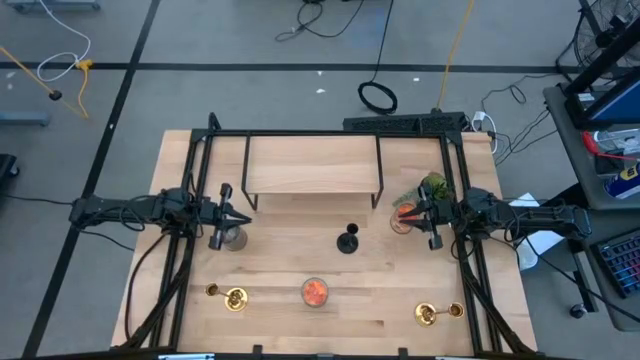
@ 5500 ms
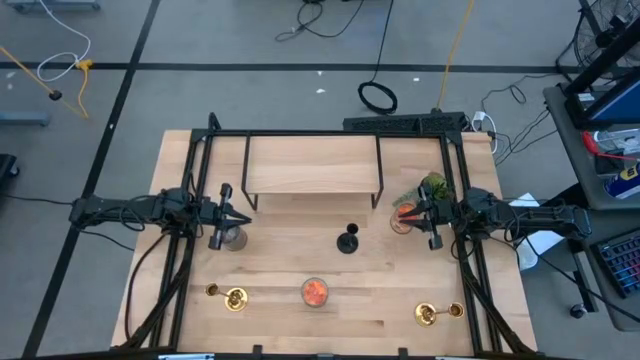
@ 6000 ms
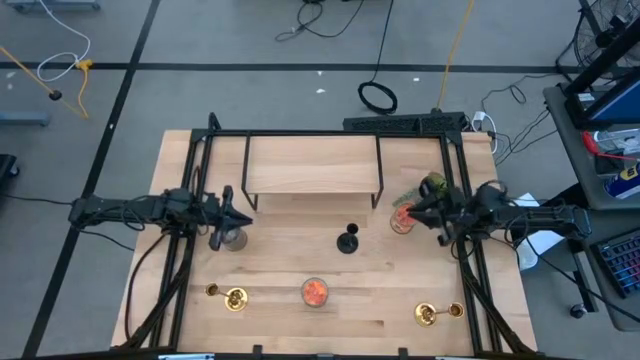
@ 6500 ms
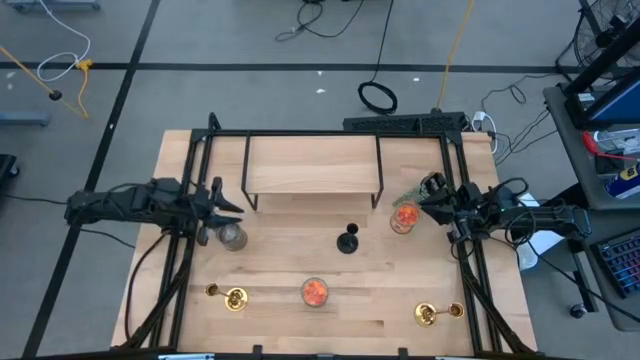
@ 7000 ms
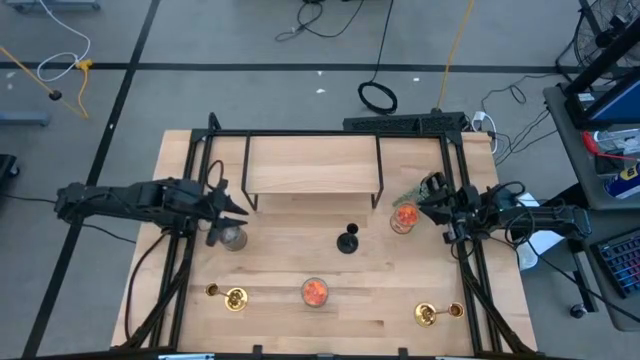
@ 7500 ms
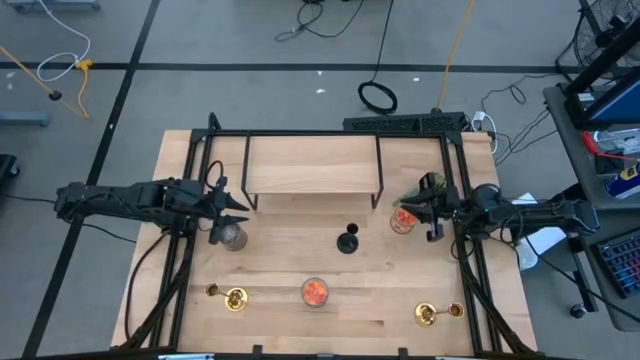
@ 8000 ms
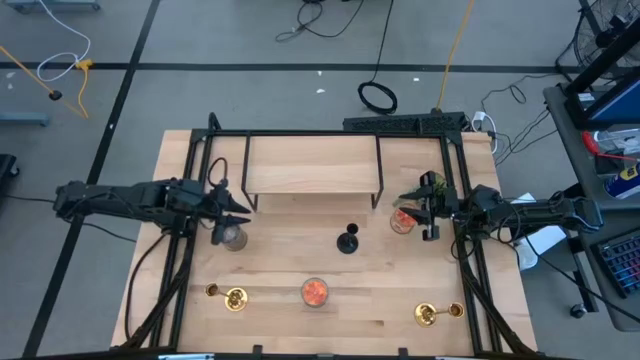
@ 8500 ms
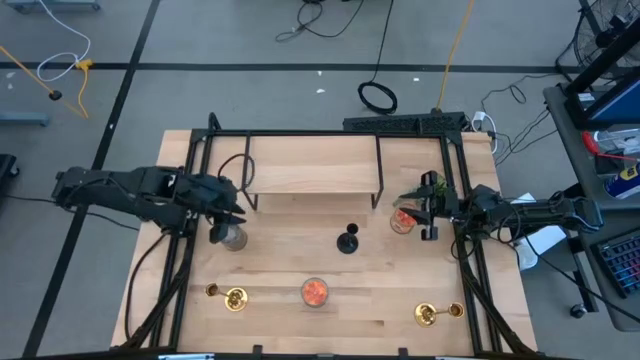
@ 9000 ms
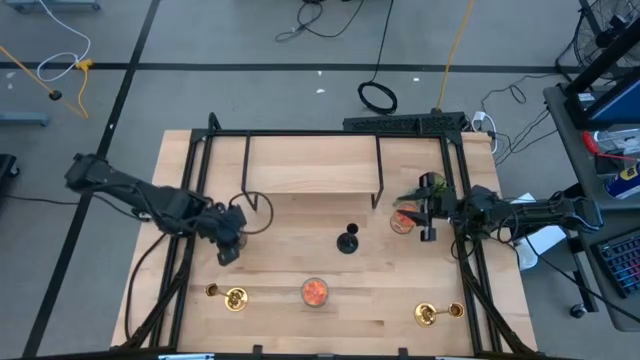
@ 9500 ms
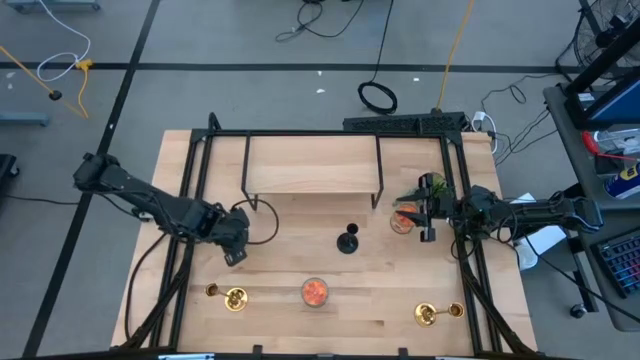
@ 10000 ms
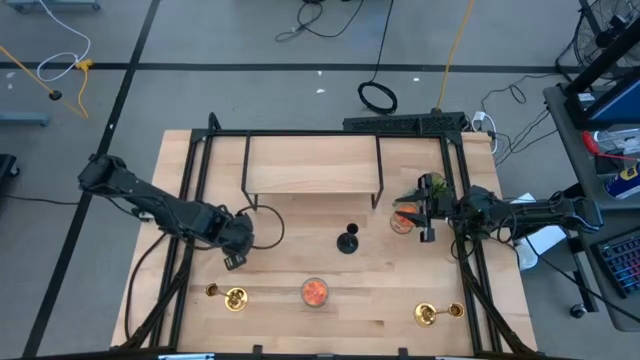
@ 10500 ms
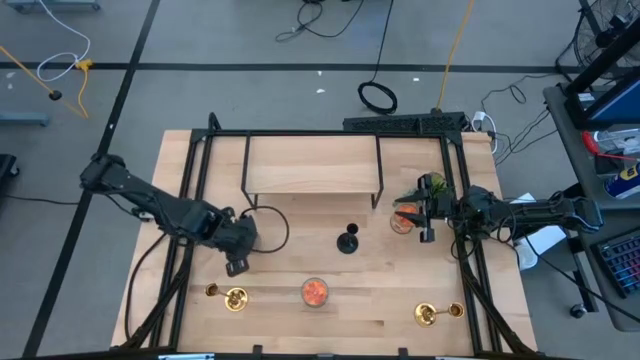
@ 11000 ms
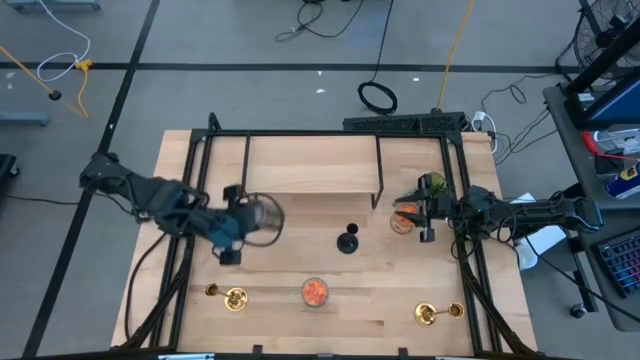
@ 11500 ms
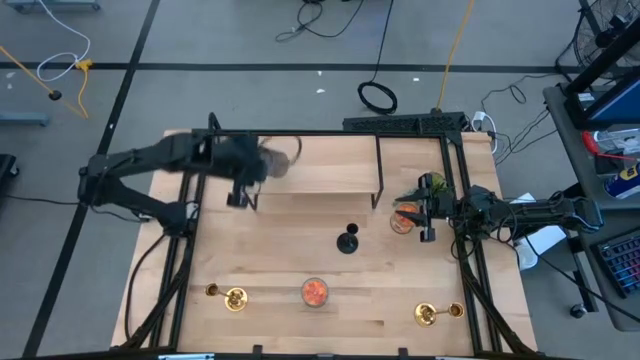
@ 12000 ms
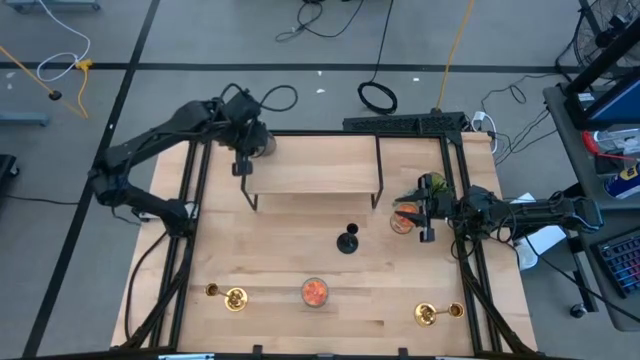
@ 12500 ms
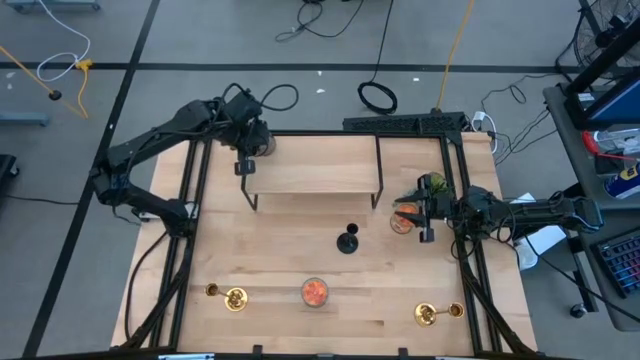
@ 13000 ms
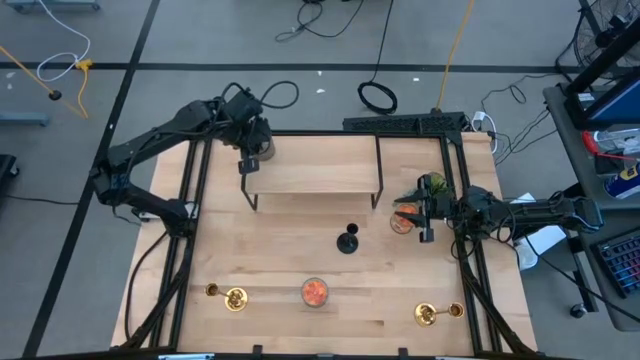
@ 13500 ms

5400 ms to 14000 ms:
Task: Pick & Place candle stick holders
Put the brown scented candle on the shelf

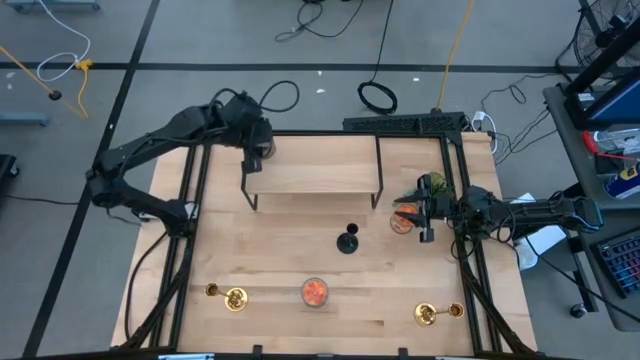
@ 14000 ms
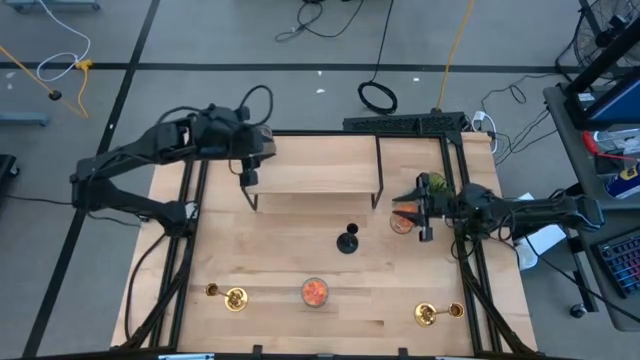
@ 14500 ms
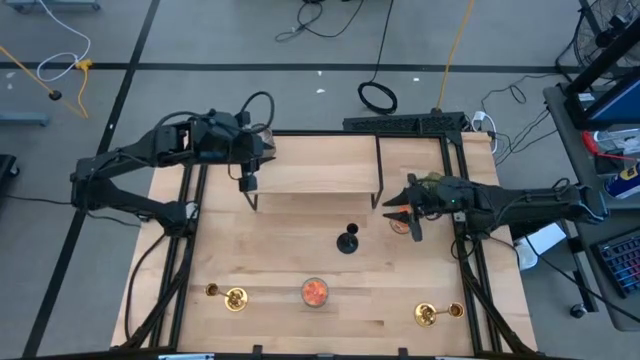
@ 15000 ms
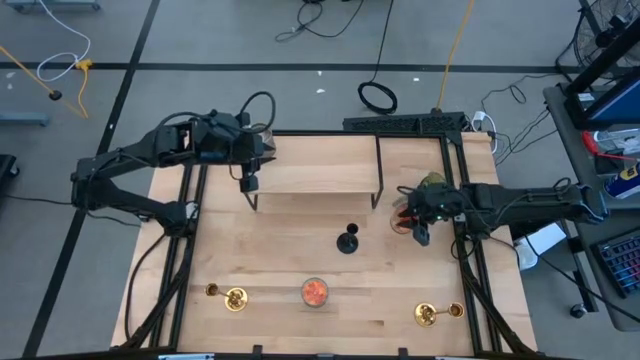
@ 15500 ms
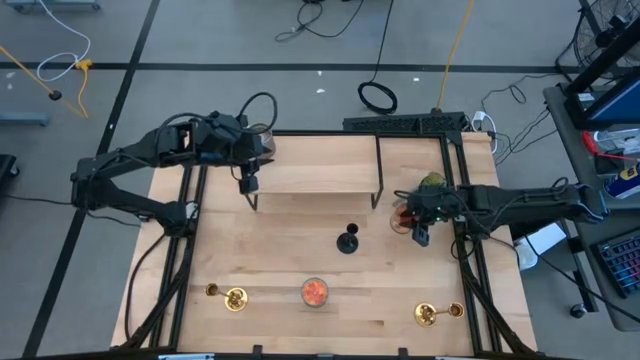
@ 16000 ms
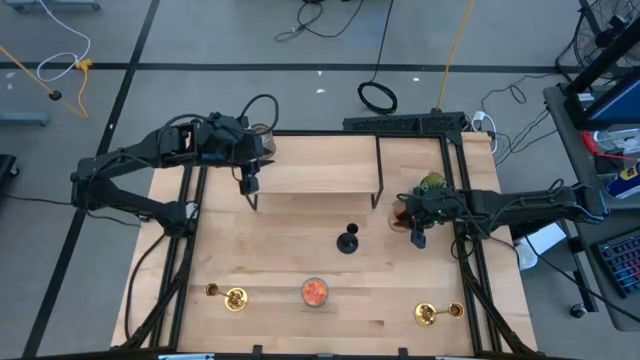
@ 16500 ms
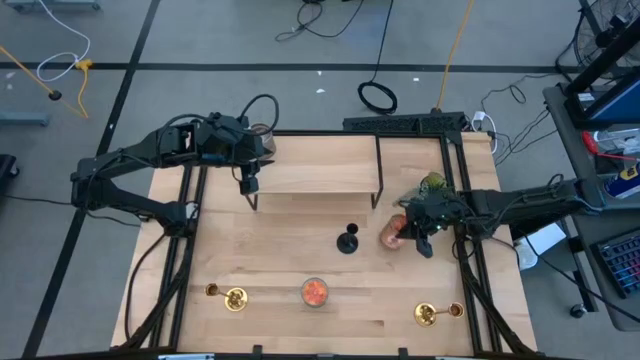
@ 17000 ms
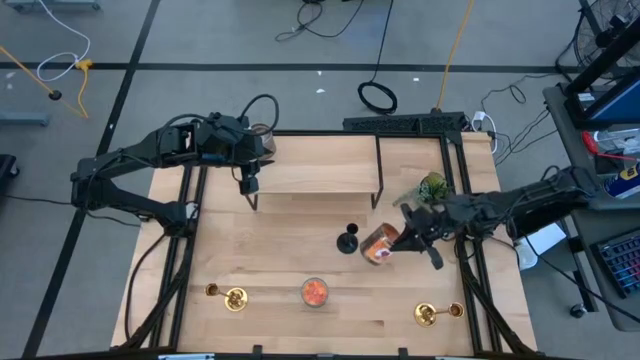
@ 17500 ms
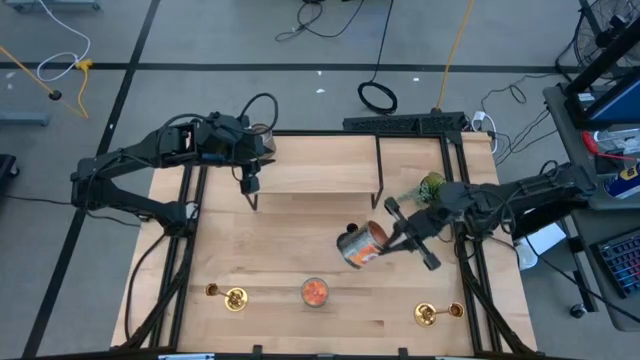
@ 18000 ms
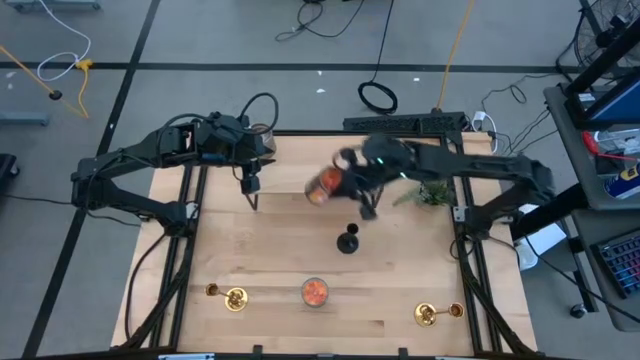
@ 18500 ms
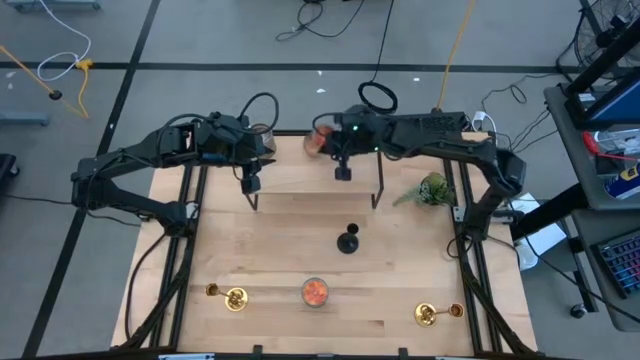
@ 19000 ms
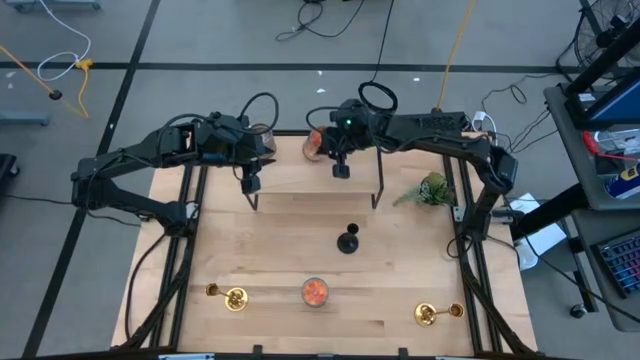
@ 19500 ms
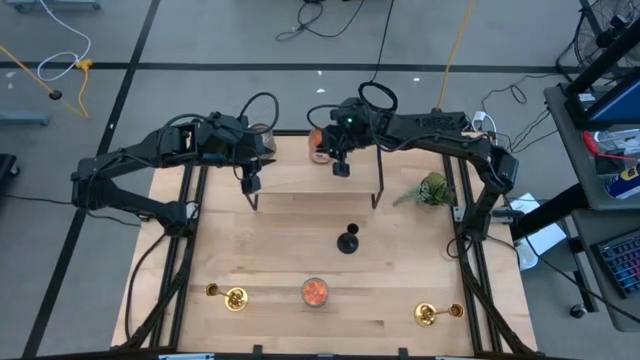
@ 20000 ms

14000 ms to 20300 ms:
Put the top orange scented candle on the shelf

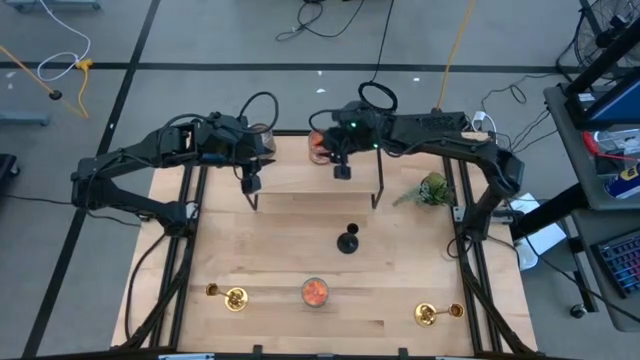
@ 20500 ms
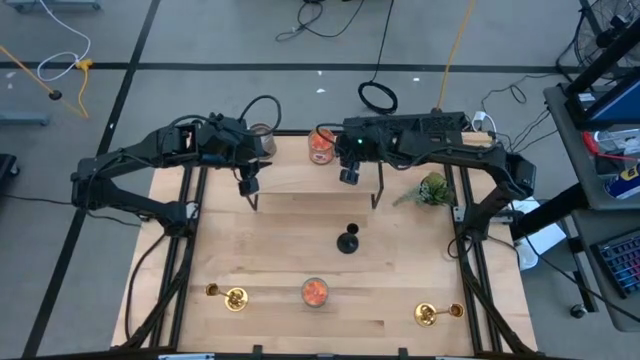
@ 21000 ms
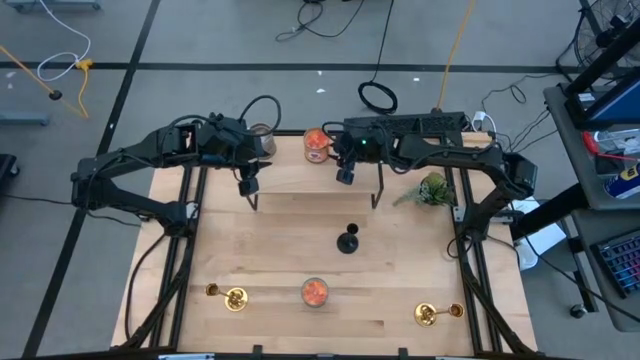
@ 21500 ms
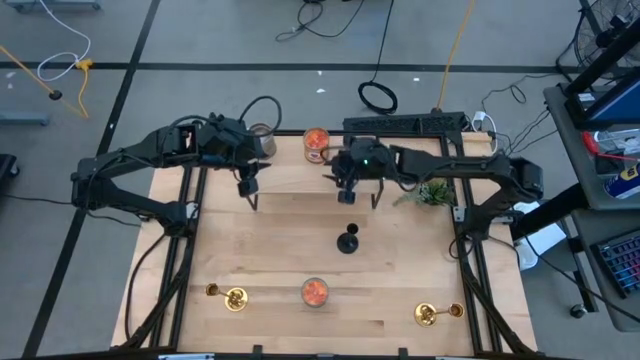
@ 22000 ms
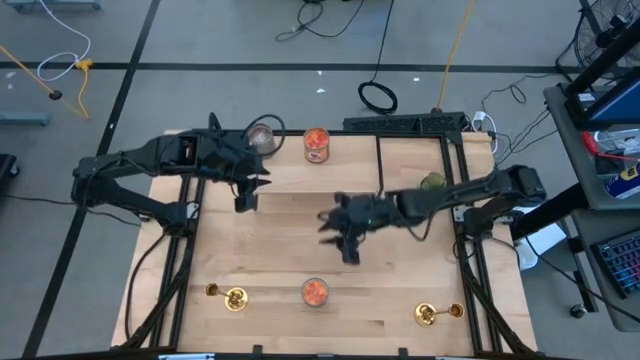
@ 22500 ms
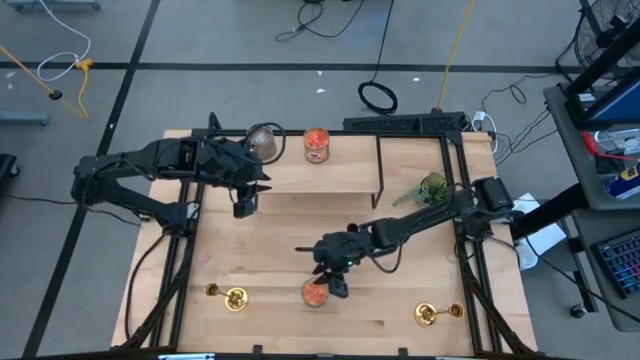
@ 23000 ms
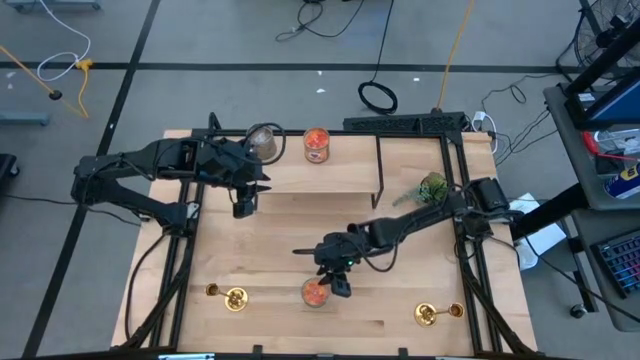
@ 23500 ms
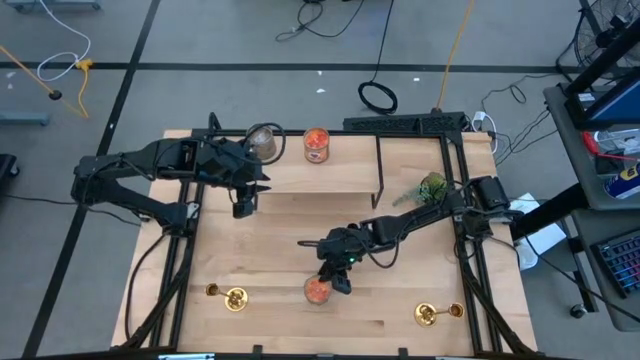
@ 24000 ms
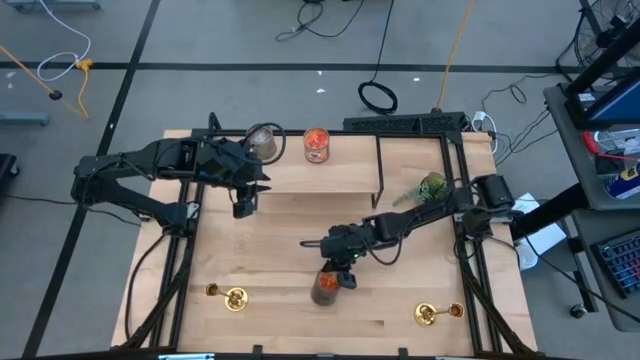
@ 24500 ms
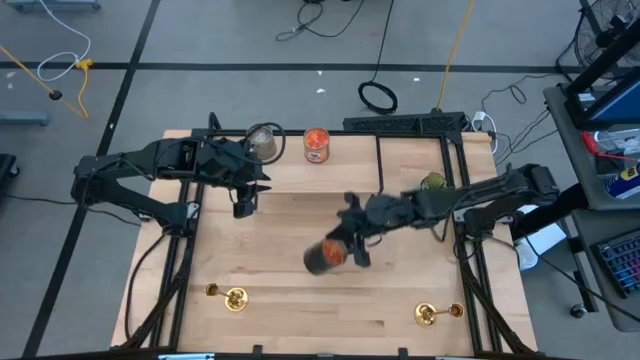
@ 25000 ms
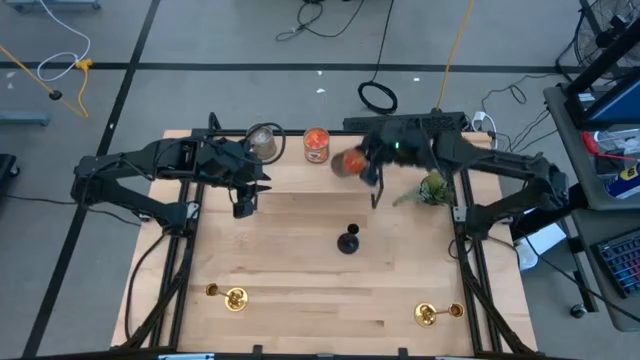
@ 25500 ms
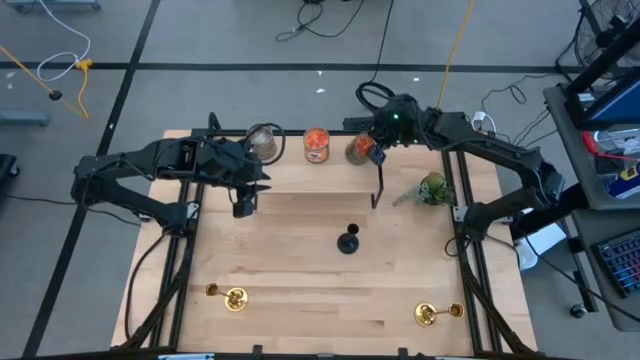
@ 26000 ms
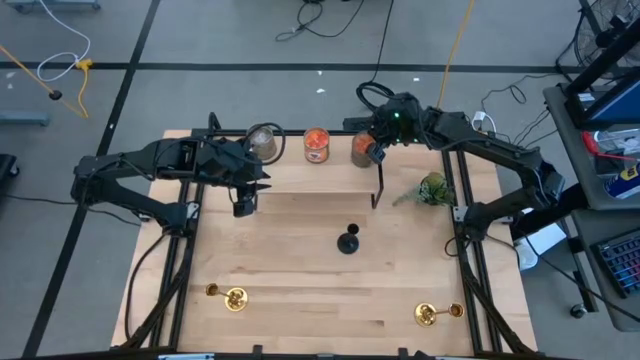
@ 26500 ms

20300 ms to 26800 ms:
Put the orange scented candle on the shelf
